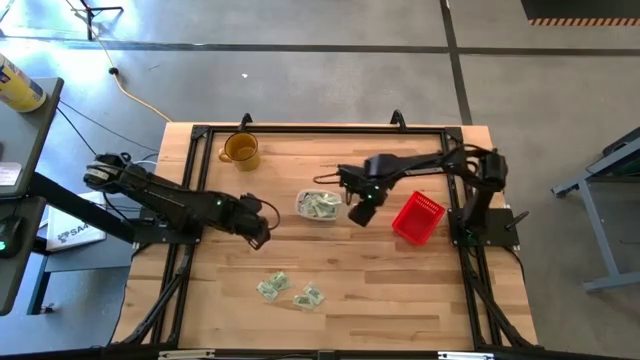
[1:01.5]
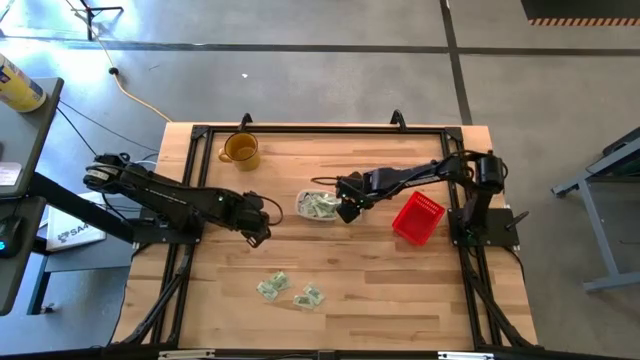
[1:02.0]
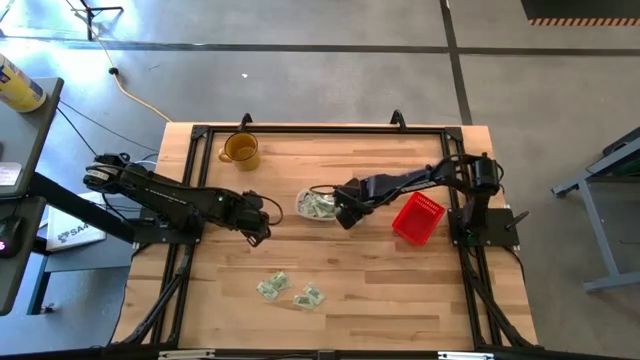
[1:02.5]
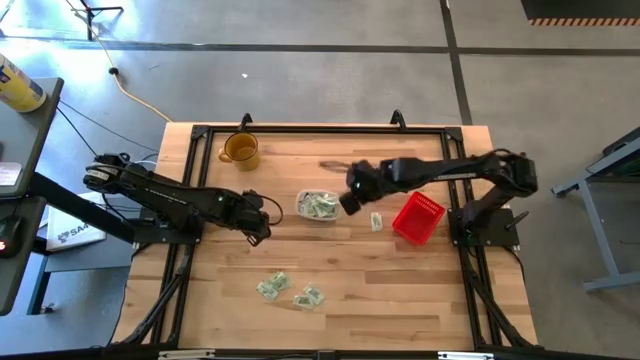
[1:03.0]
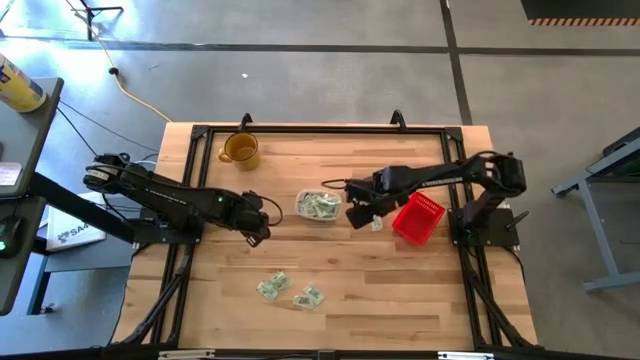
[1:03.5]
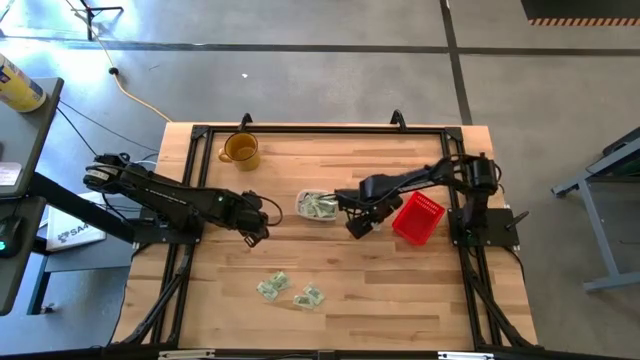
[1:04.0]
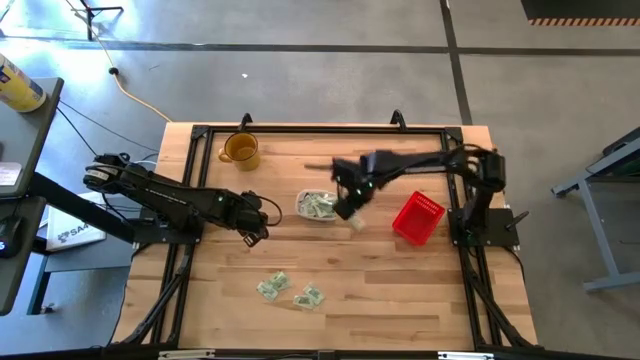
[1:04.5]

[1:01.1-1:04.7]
Task: Pick and place items into bin
Put the white stevia packet into the transparent bin

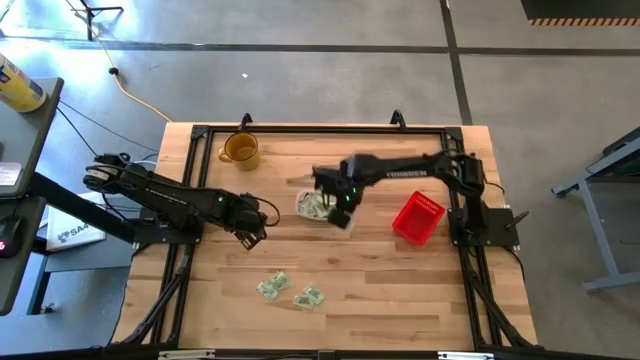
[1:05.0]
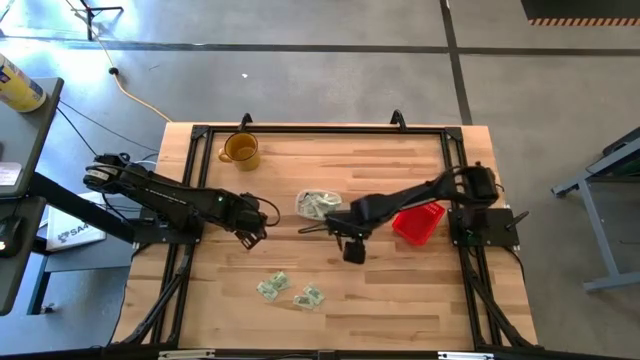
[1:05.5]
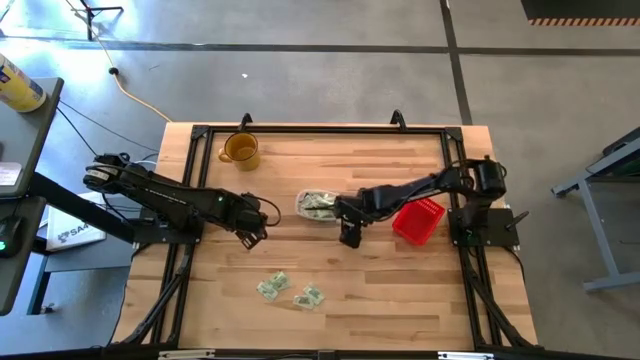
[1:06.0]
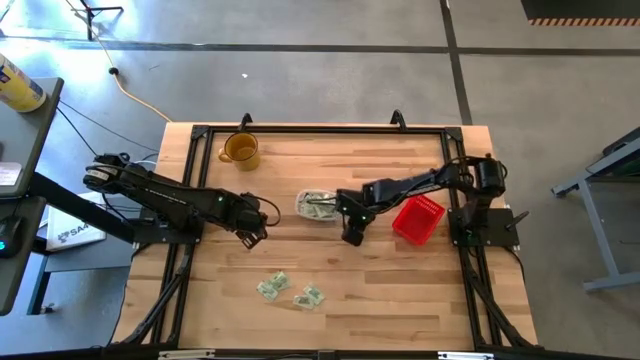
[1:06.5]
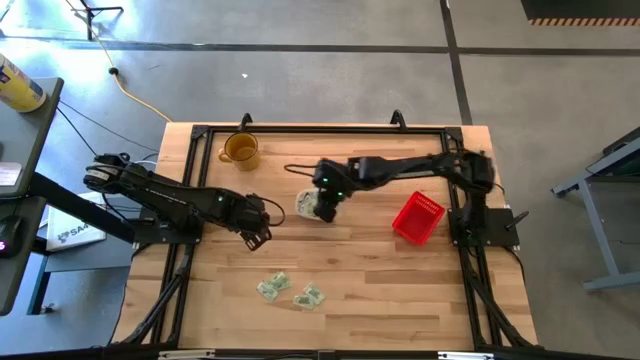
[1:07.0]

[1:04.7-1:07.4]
Put the white stevia packet into the transparent bin

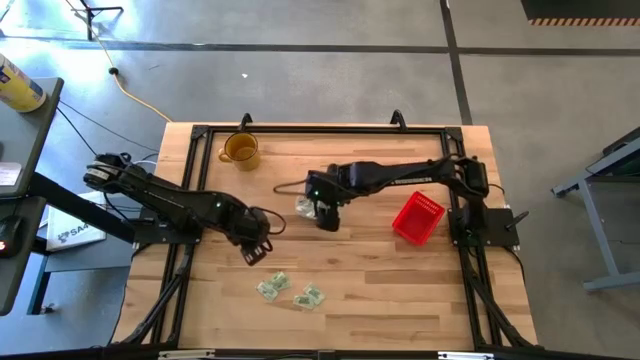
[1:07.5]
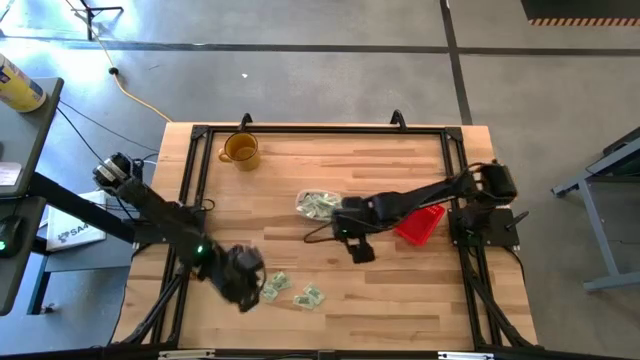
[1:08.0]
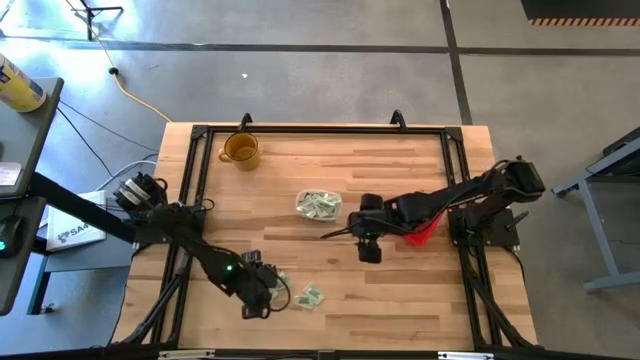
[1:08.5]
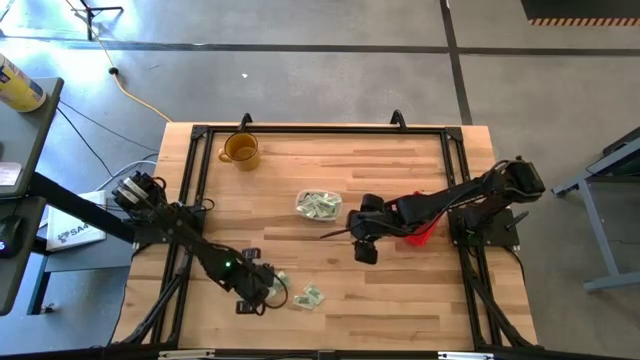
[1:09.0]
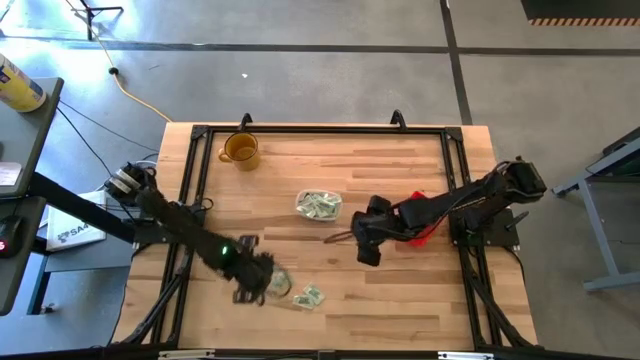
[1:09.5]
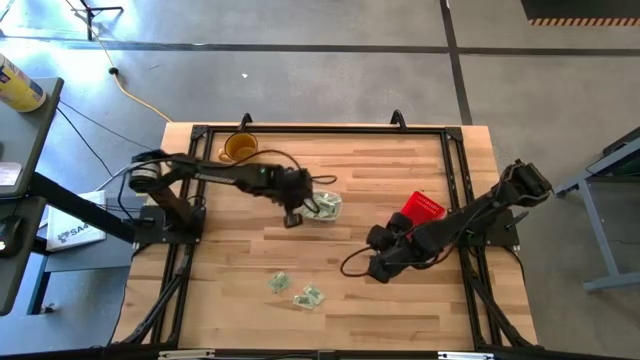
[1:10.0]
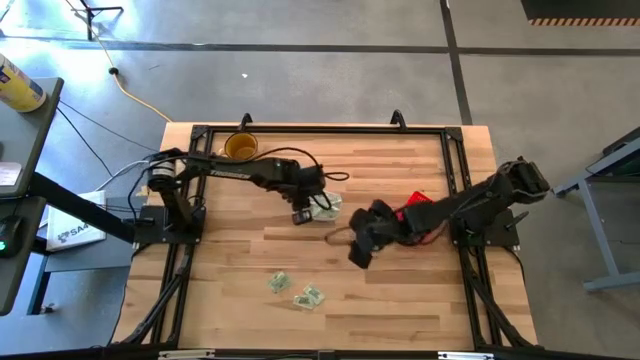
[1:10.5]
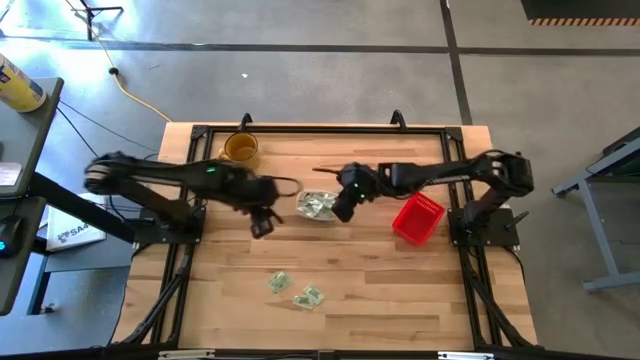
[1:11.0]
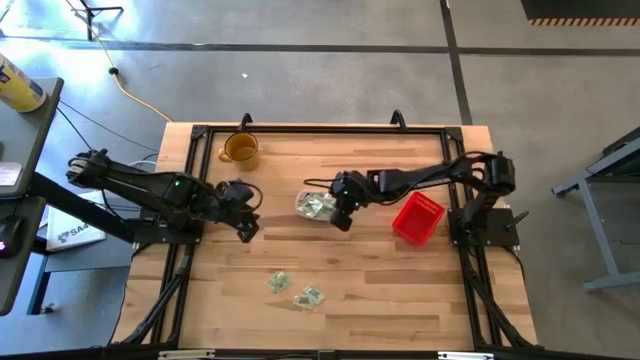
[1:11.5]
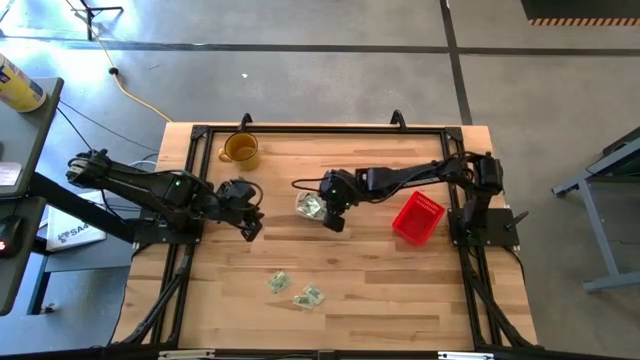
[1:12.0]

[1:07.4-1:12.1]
Put the white stevia packet into the transparent bin

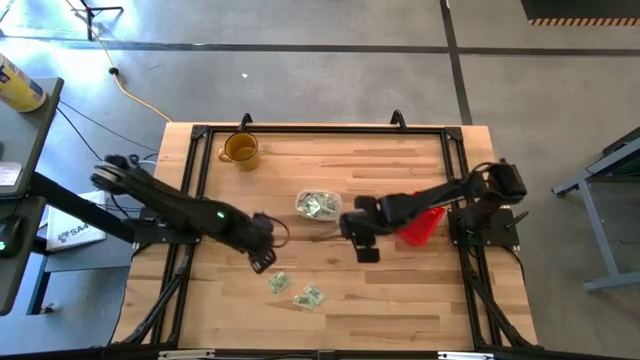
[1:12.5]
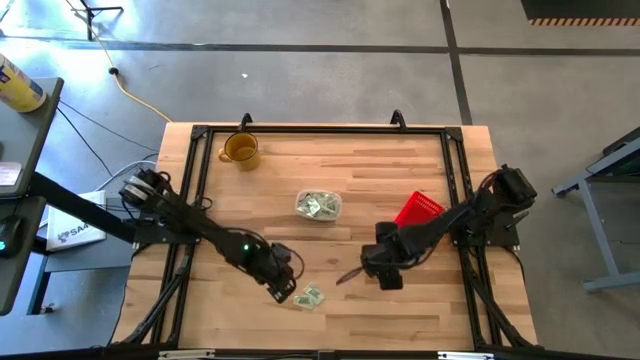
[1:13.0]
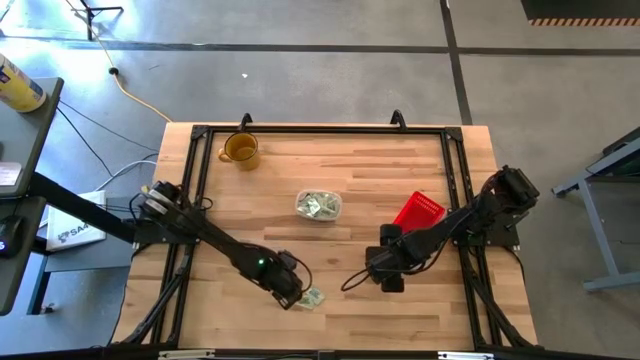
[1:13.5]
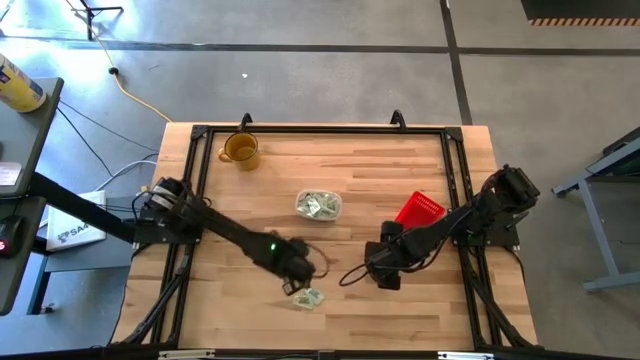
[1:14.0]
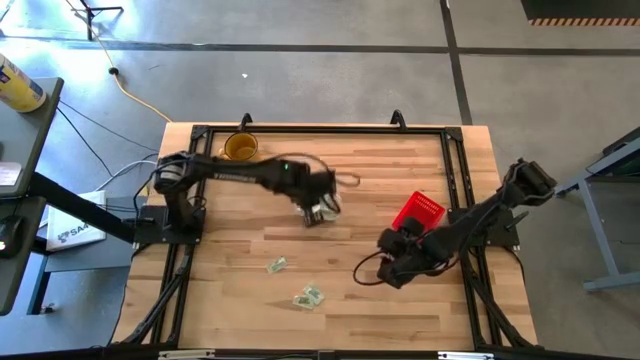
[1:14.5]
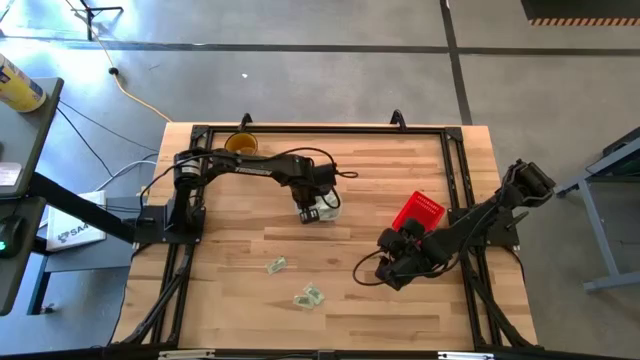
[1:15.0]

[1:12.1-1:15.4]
Put the white stevia packet into the transparent bin

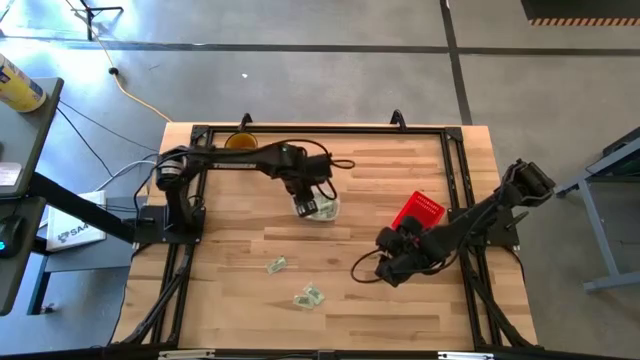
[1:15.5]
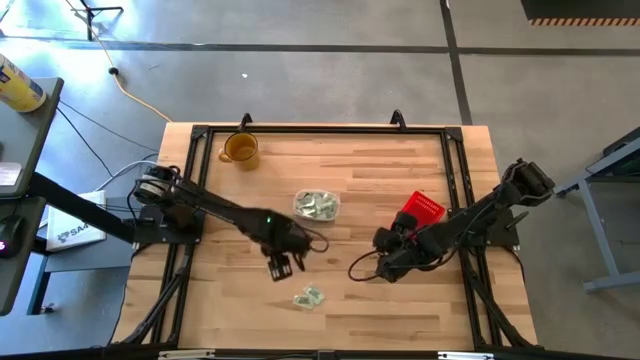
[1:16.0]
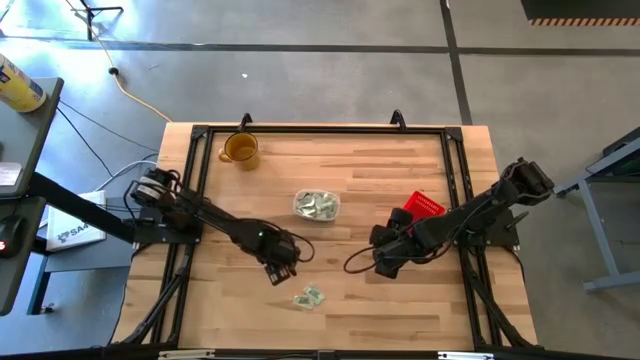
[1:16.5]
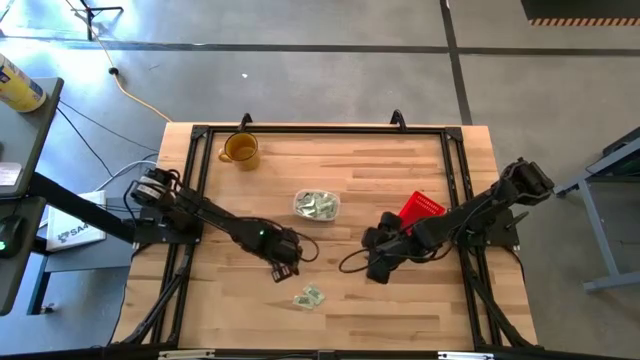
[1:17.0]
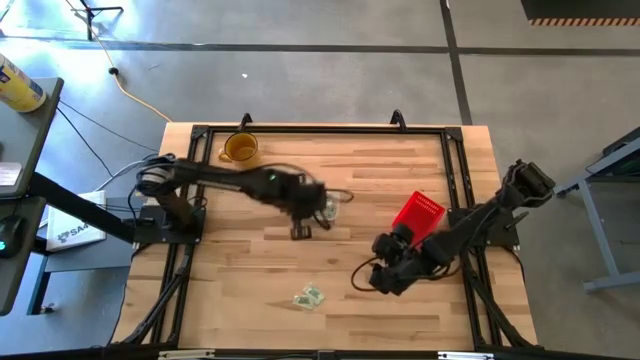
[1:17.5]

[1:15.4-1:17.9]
Put the top left white stevia packet into the transparent bin

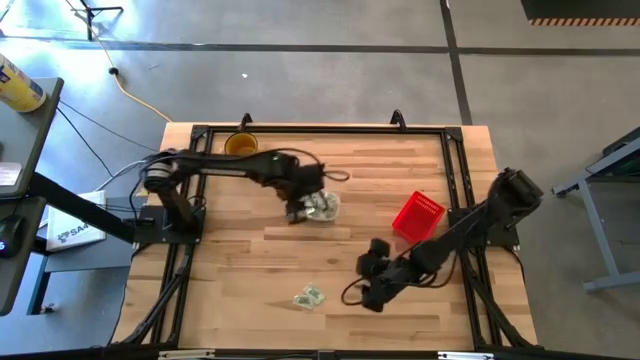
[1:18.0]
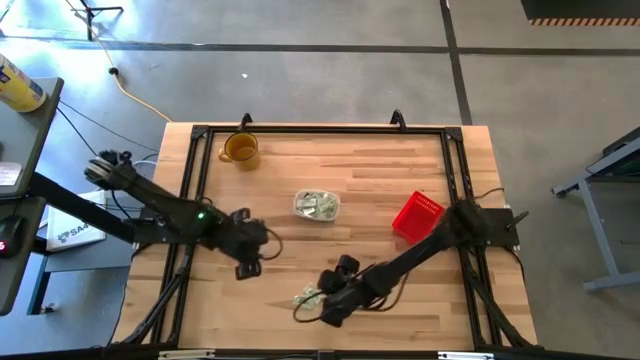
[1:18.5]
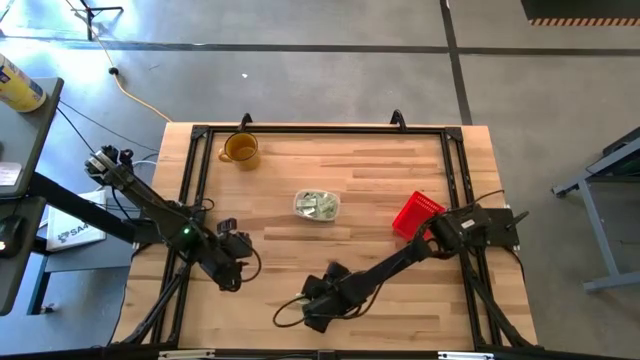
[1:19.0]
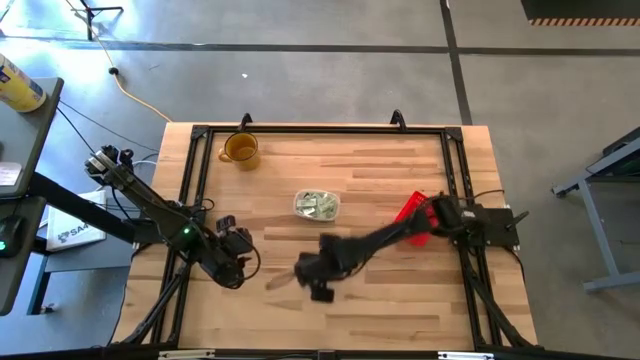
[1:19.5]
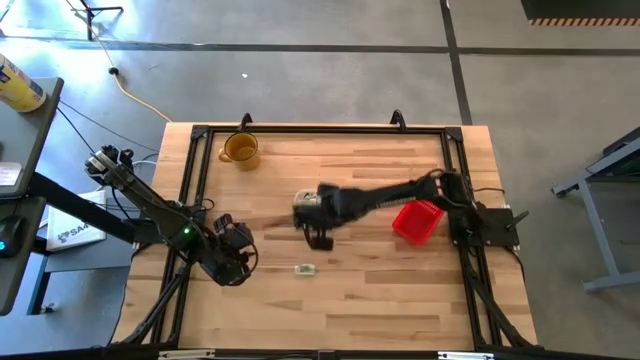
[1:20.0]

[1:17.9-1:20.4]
Put the top white stevia packet into the transparent bin

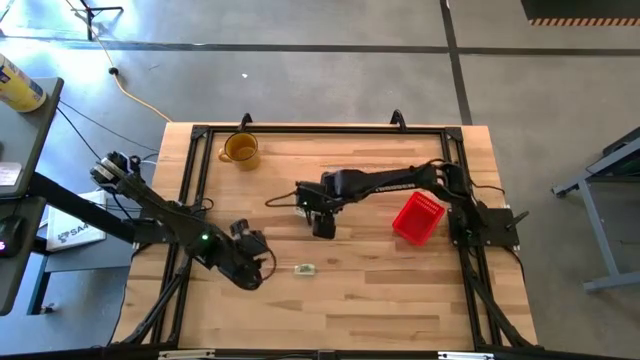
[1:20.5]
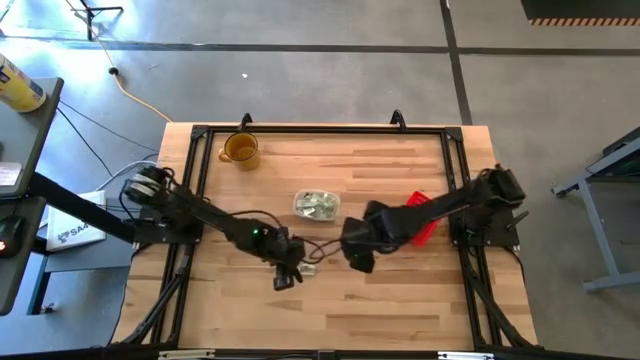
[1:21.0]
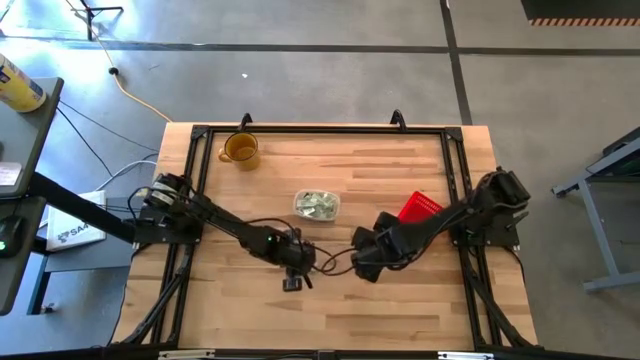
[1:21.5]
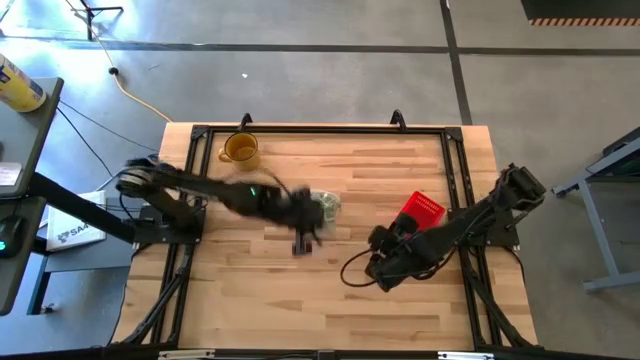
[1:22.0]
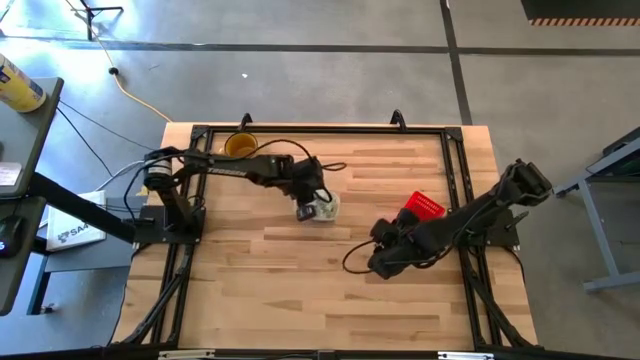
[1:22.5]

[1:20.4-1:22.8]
Put the white stevia packet into the transparent bin

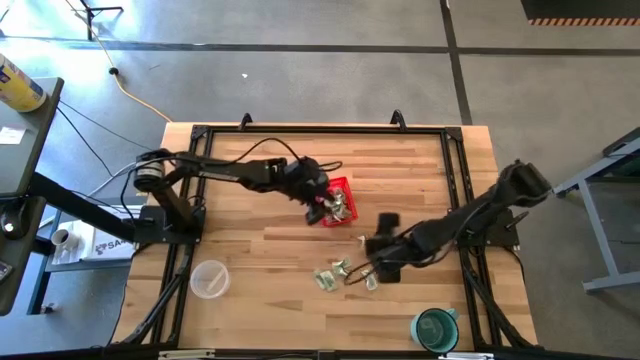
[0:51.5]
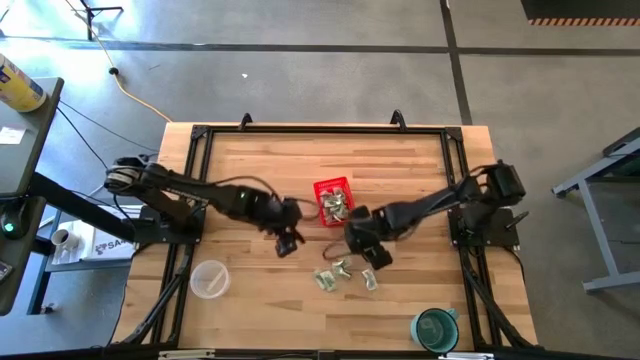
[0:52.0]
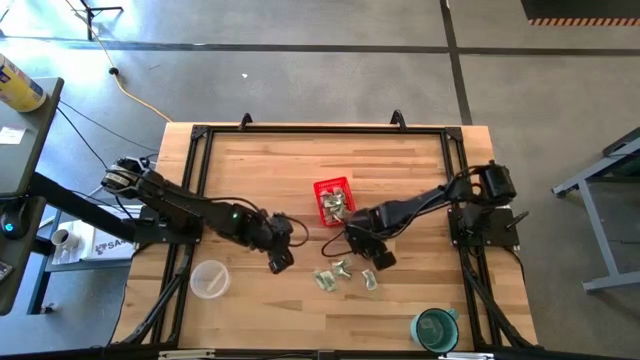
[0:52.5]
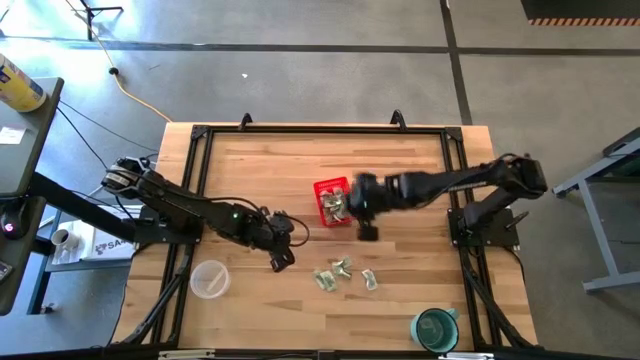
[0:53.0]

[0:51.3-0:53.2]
Task: Pick and place items into bin
Put the green truvia packet into the red bin
